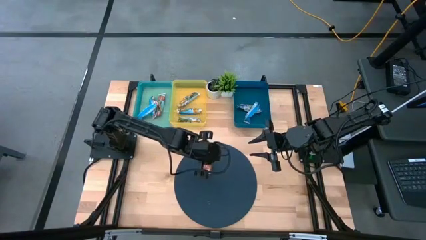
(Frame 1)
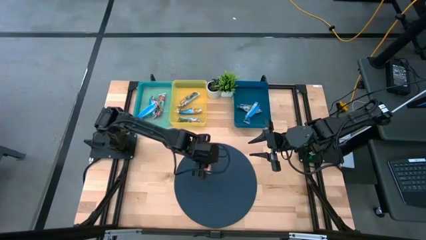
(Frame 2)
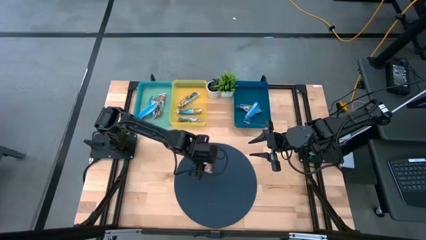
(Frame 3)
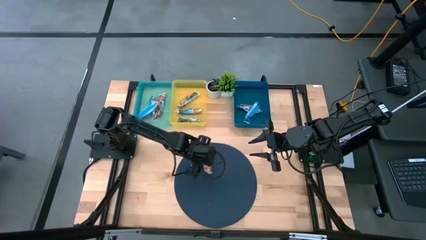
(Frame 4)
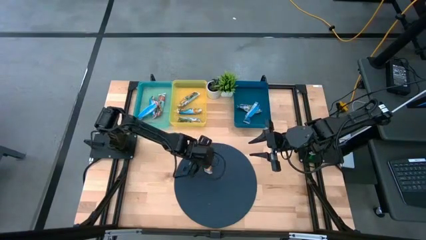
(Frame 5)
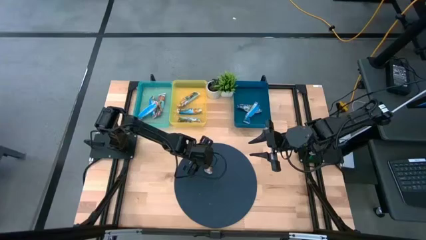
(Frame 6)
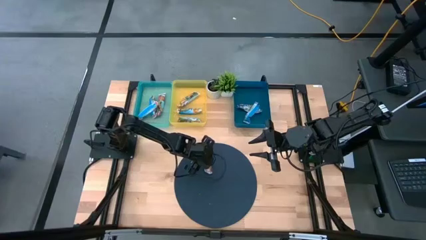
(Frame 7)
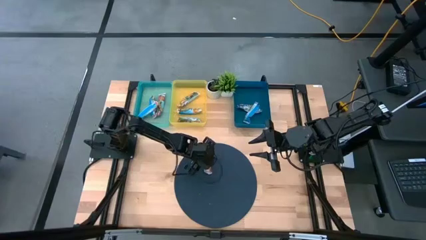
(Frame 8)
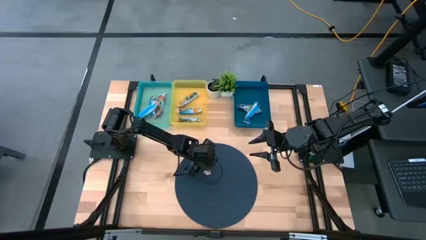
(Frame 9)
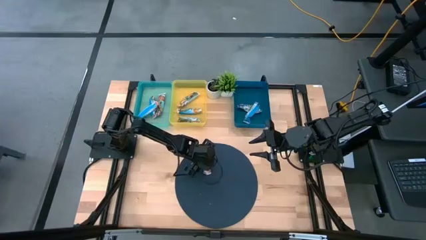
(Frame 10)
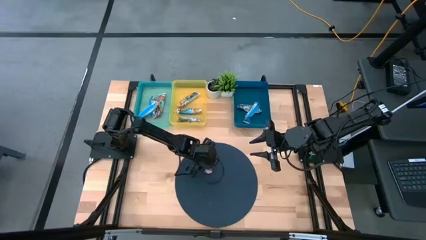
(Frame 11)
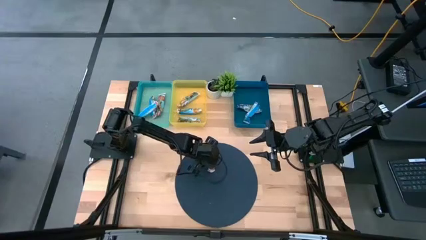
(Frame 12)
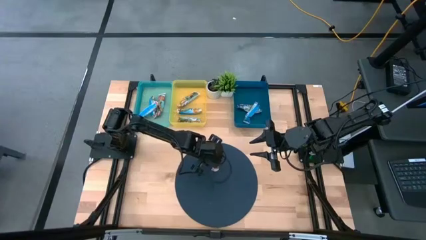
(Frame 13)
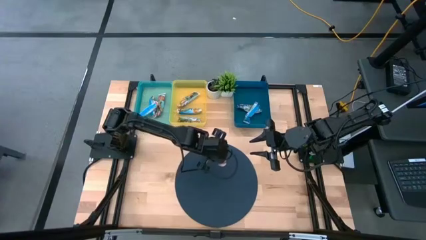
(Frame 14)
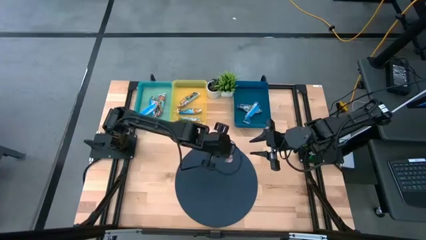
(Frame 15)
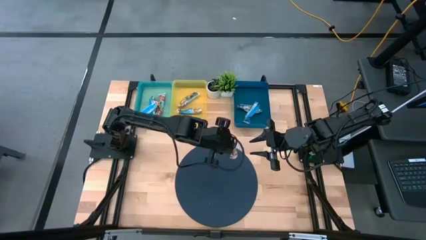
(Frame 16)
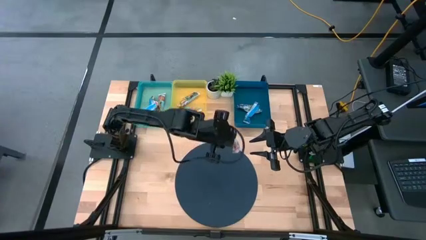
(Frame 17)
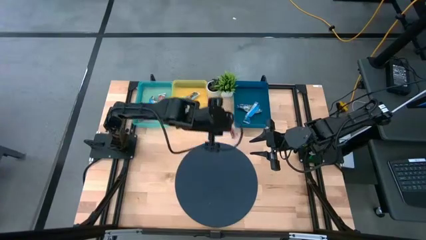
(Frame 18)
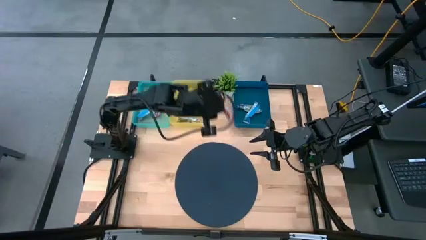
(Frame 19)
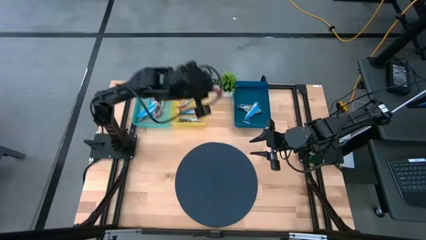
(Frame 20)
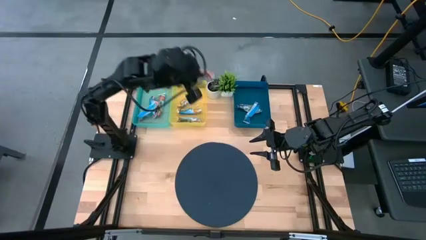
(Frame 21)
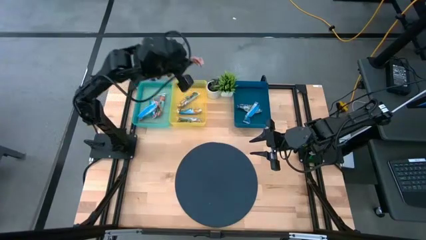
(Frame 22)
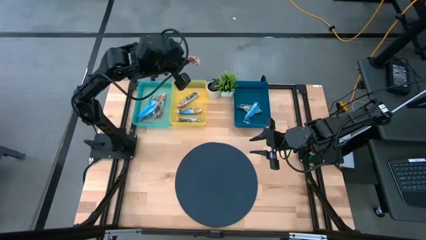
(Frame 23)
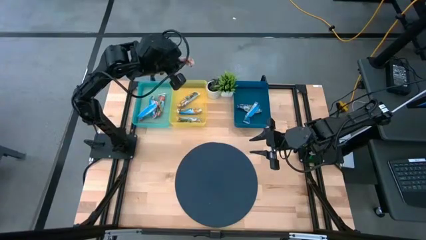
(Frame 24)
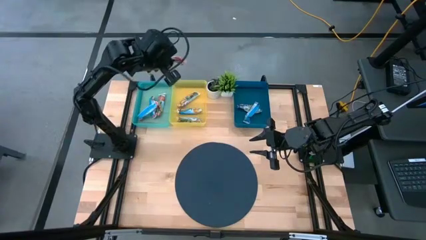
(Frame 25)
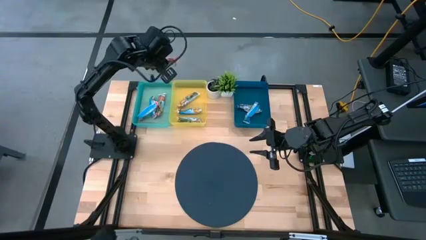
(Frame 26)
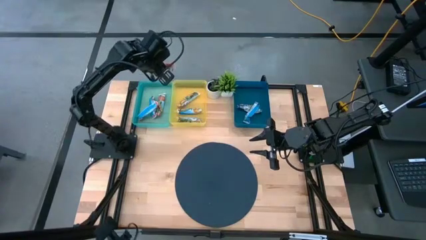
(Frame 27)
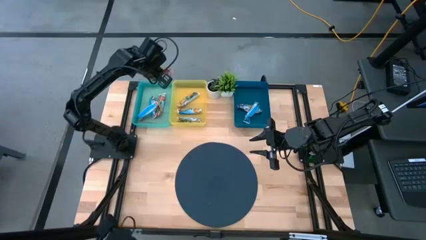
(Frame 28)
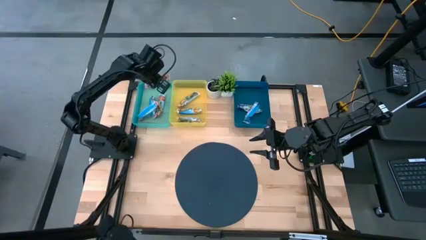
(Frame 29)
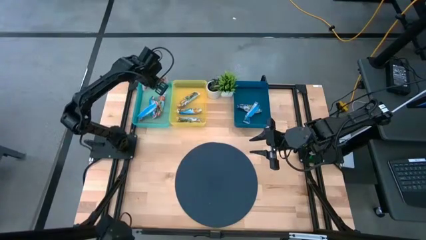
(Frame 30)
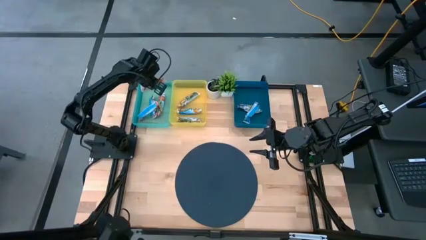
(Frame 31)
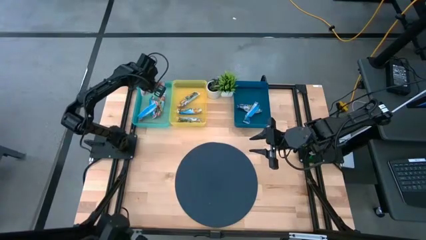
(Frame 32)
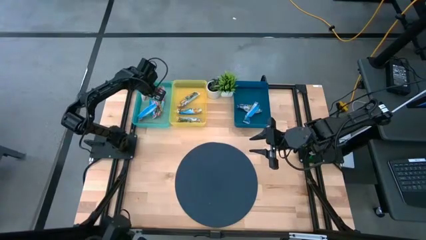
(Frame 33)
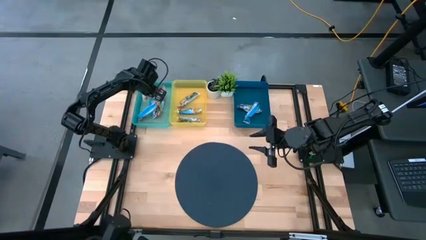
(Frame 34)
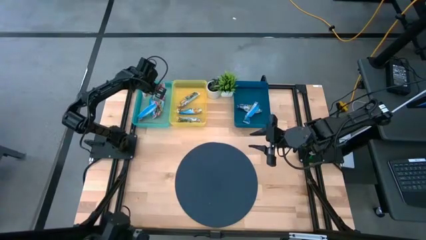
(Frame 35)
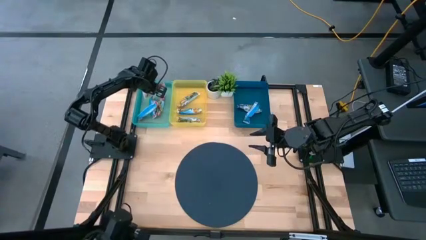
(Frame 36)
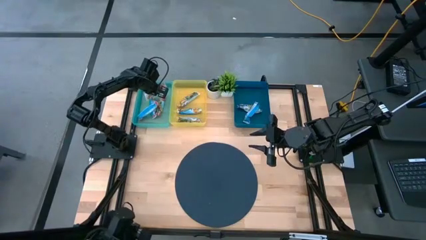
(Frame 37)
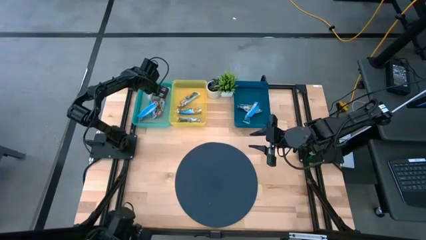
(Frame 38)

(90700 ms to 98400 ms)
Task: Pick and place Granola Bars by type
Put the red granola bar into the green bin

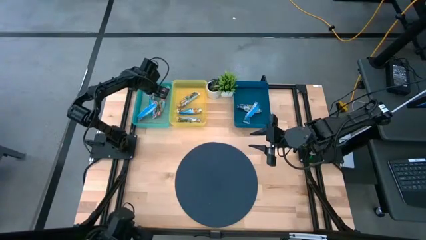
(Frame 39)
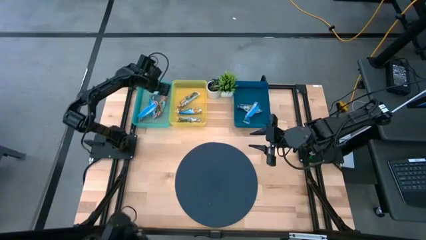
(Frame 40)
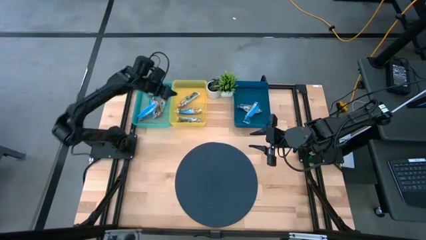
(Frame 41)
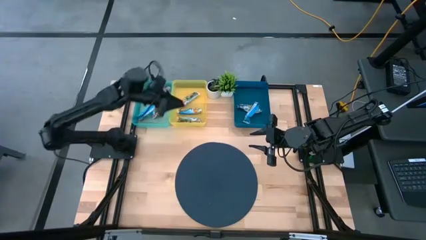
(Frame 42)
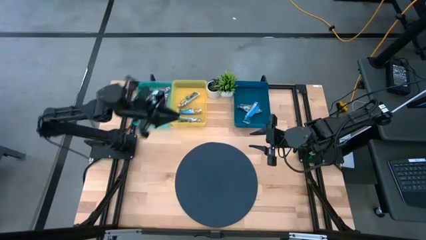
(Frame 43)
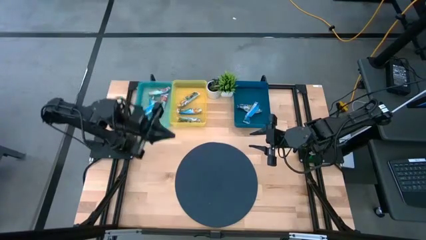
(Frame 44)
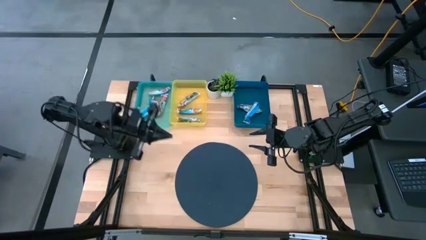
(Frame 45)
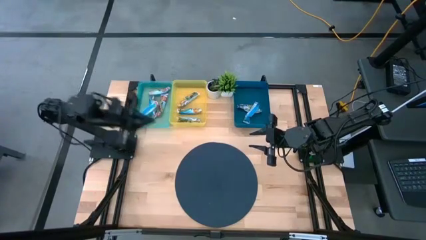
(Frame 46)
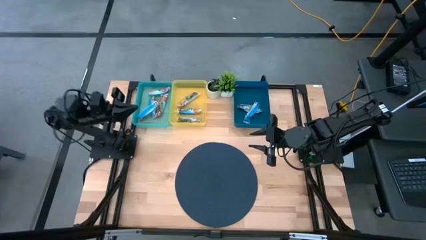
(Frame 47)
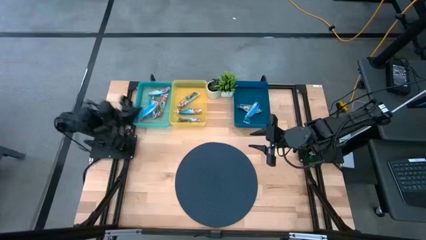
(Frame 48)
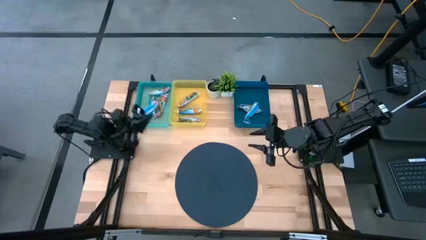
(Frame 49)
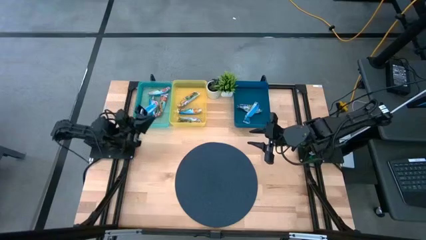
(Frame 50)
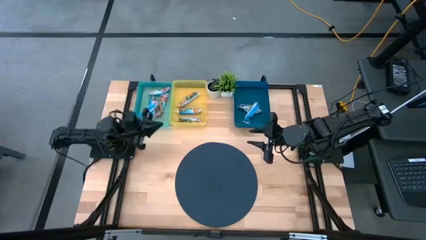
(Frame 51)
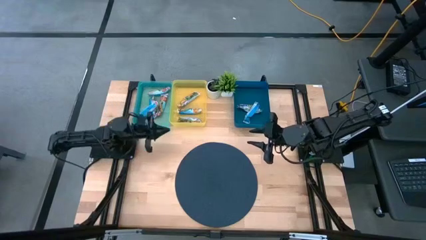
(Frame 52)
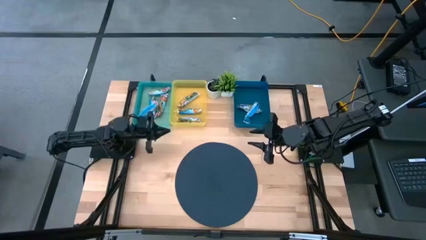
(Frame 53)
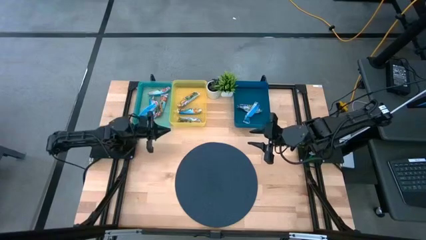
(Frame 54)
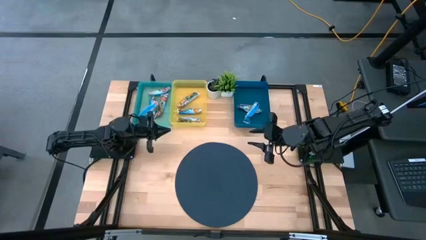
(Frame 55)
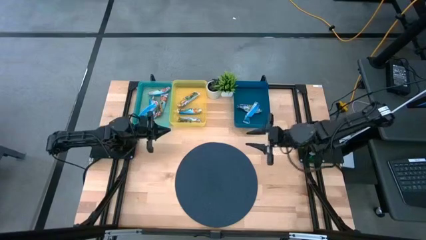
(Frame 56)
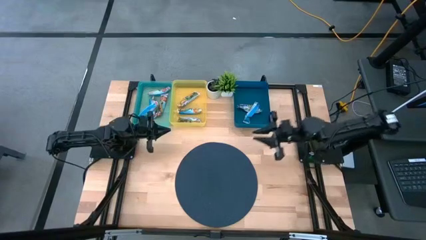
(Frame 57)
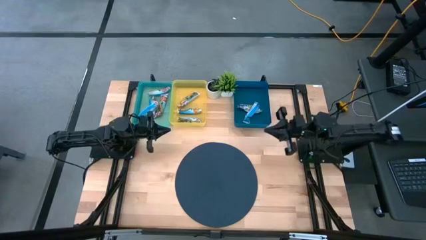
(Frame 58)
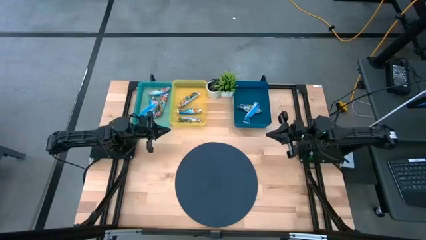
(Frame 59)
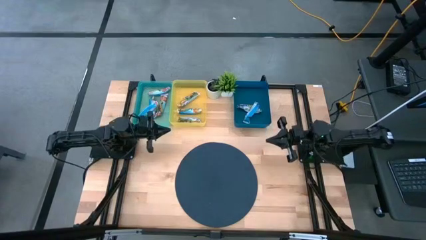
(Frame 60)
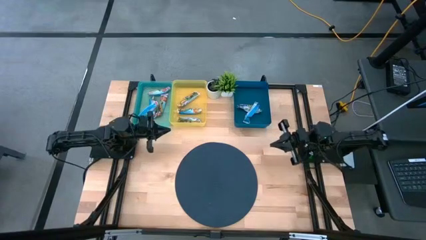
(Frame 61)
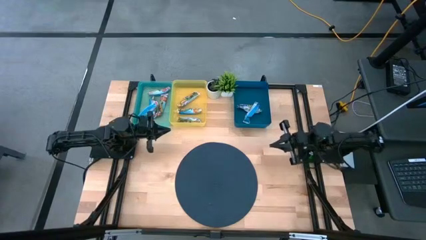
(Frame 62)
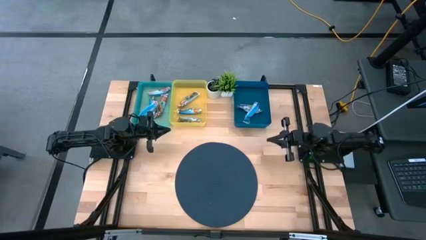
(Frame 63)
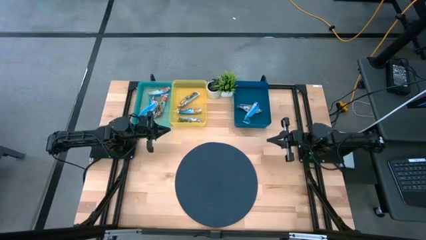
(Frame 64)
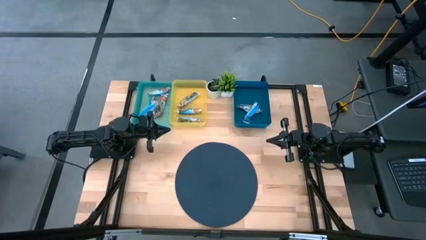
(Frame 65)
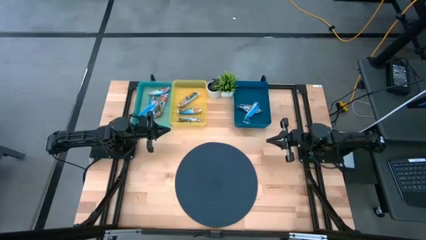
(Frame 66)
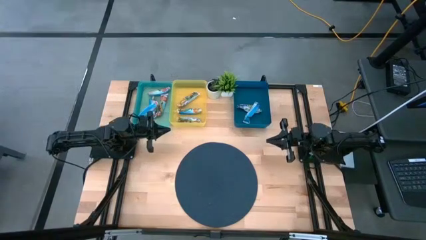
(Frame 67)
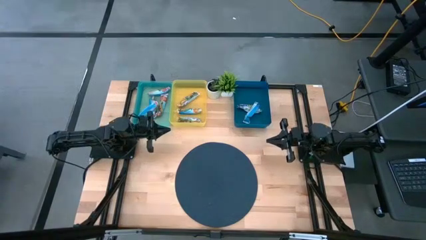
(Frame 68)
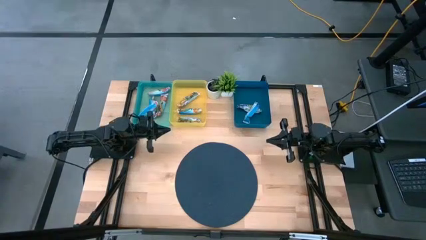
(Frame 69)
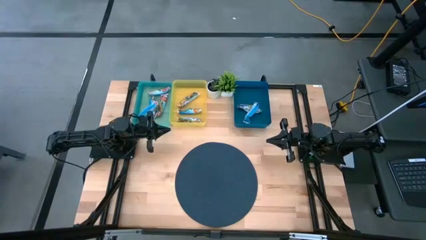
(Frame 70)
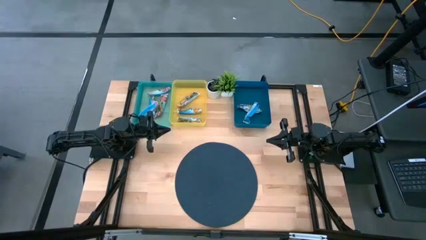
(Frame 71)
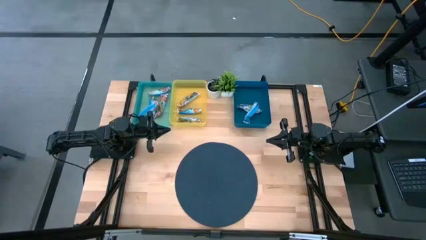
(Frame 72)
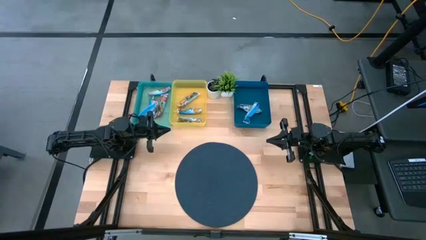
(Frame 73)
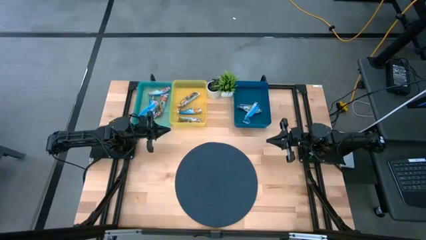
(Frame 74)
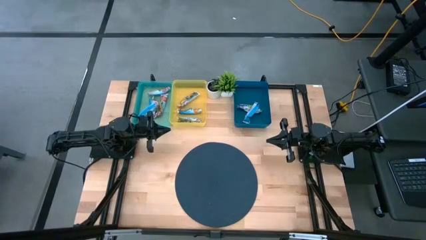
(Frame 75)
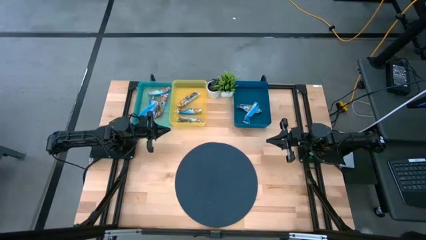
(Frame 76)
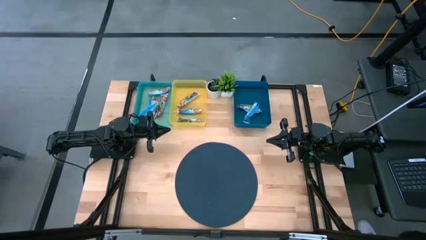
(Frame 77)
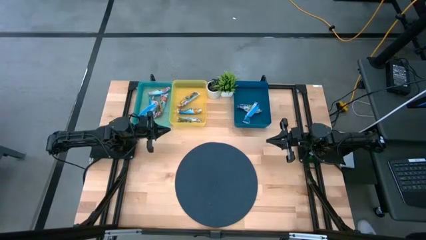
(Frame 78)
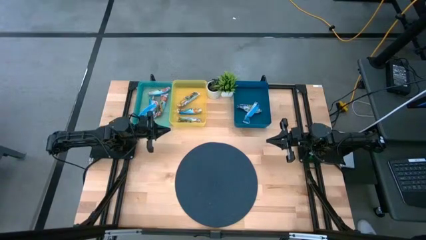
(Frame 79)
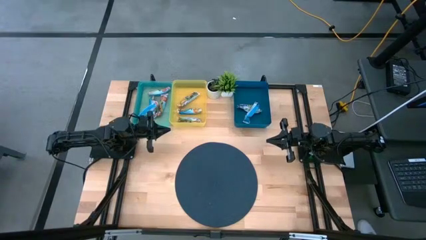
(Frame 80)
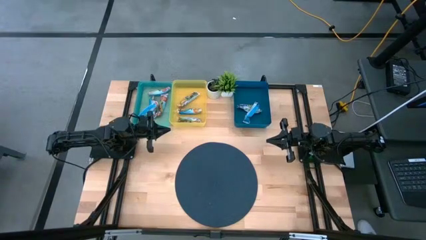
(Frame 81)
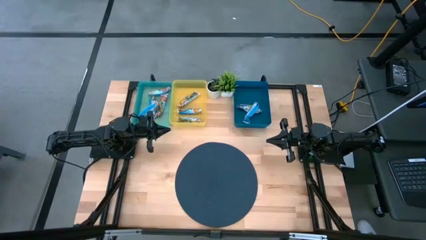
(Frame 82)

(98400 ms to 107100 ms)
Return to Home Position
